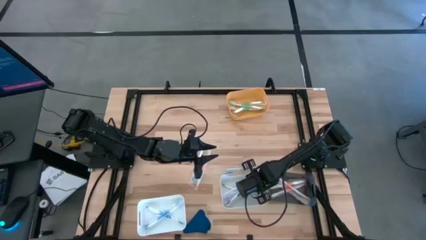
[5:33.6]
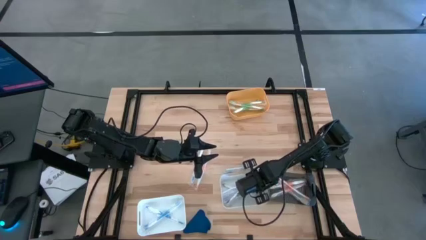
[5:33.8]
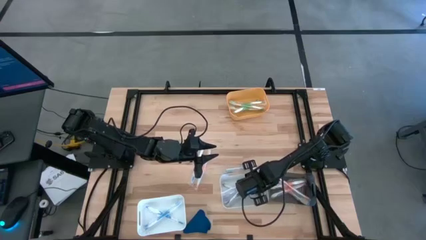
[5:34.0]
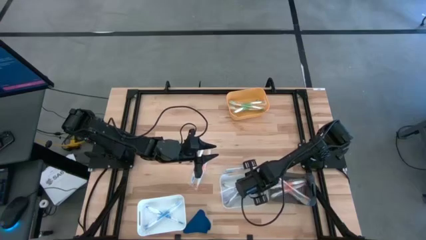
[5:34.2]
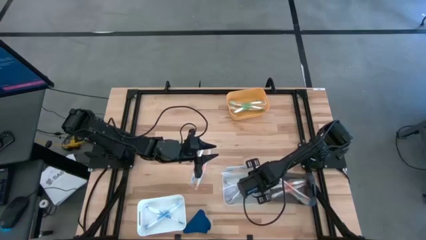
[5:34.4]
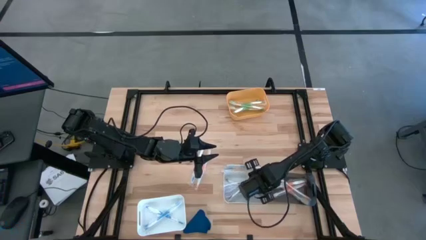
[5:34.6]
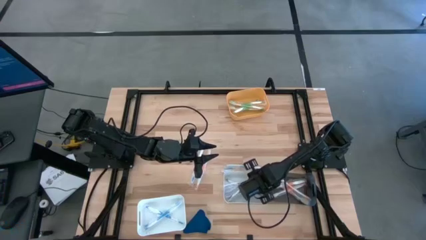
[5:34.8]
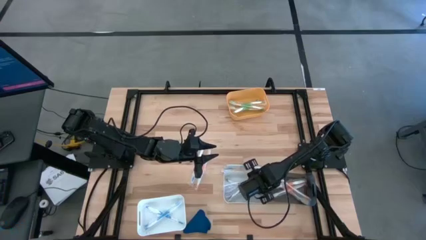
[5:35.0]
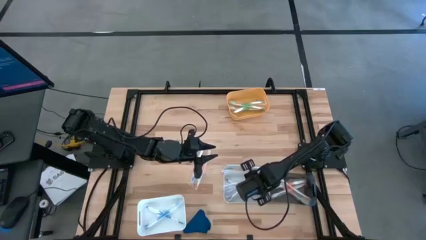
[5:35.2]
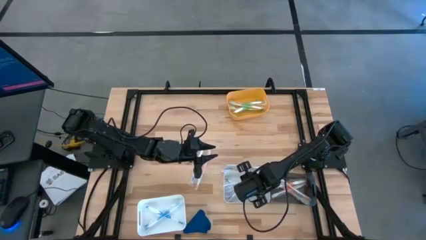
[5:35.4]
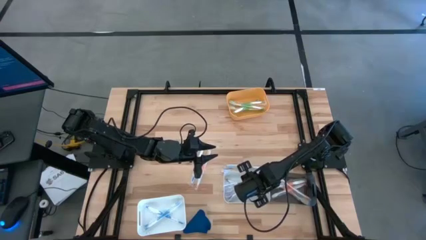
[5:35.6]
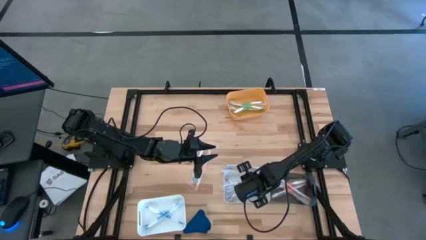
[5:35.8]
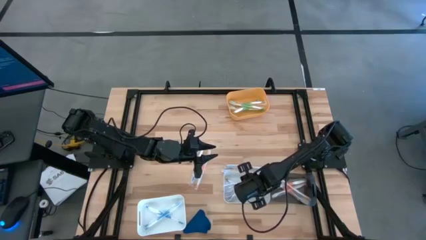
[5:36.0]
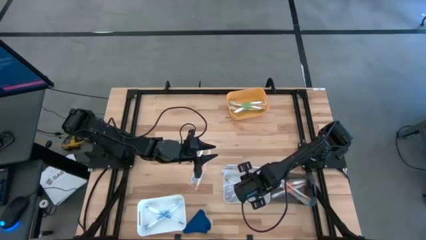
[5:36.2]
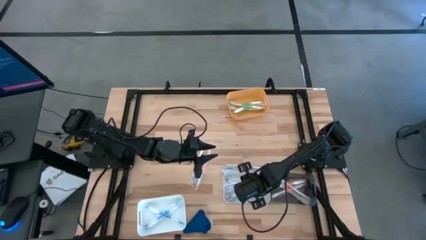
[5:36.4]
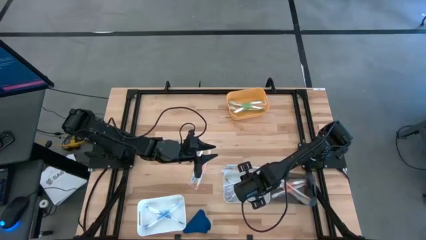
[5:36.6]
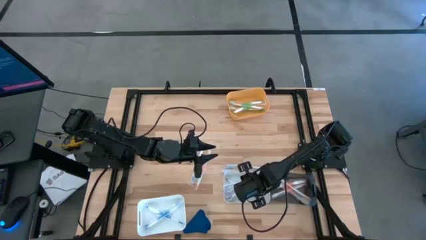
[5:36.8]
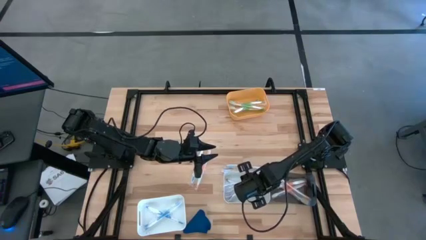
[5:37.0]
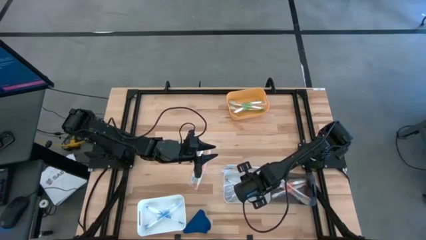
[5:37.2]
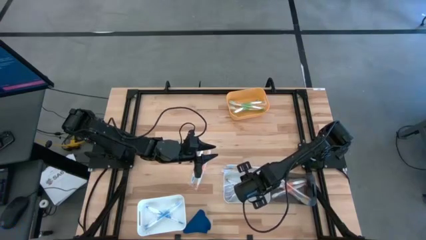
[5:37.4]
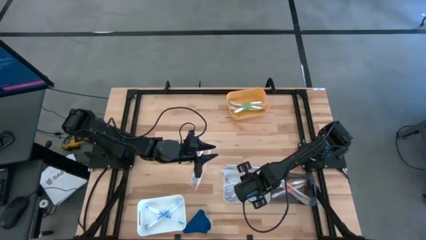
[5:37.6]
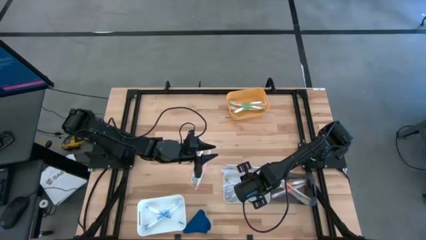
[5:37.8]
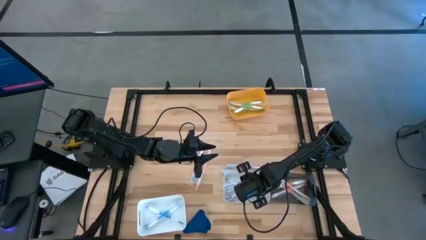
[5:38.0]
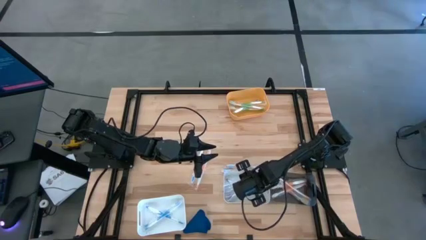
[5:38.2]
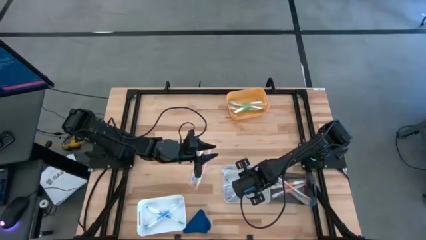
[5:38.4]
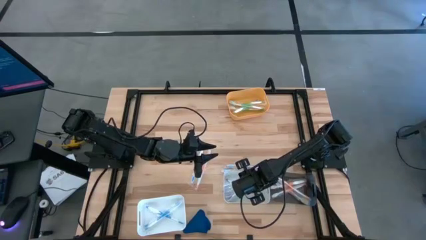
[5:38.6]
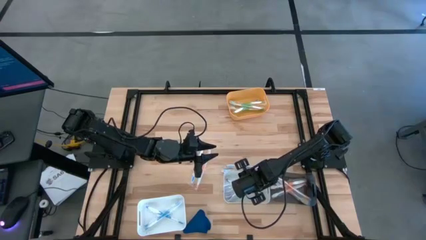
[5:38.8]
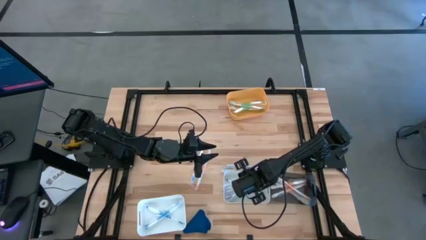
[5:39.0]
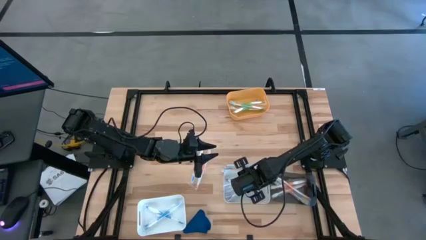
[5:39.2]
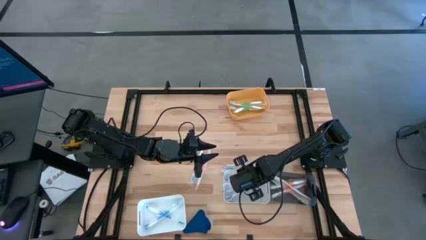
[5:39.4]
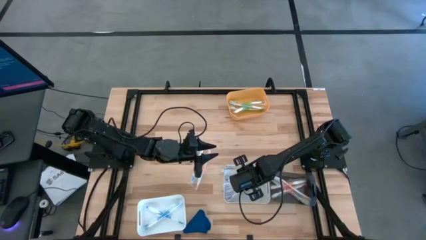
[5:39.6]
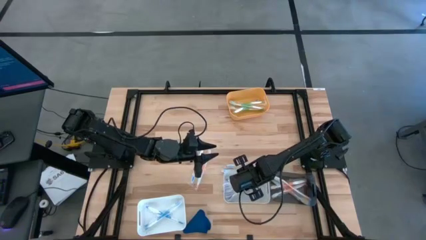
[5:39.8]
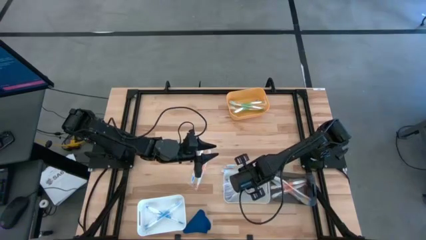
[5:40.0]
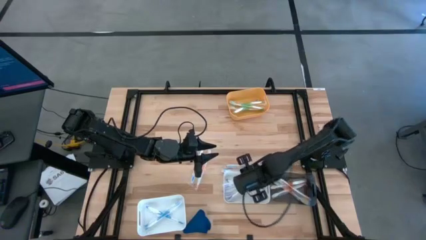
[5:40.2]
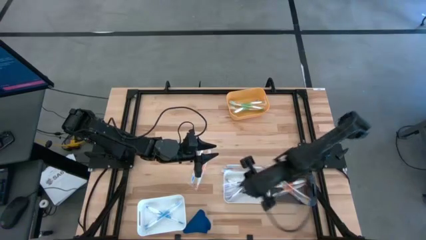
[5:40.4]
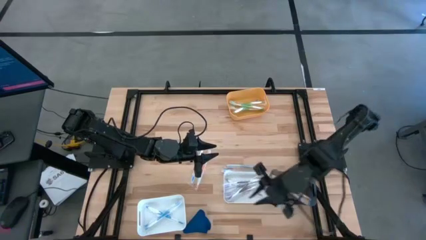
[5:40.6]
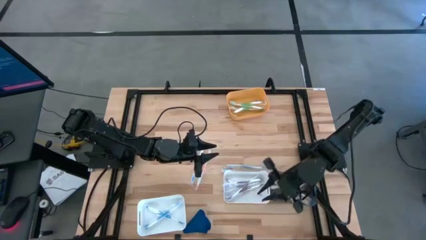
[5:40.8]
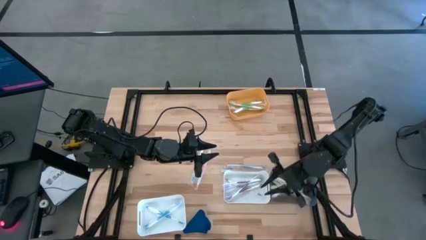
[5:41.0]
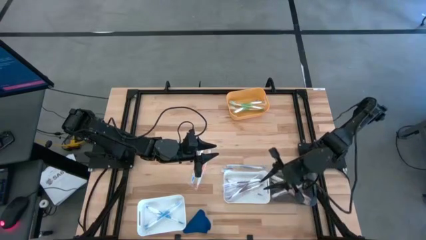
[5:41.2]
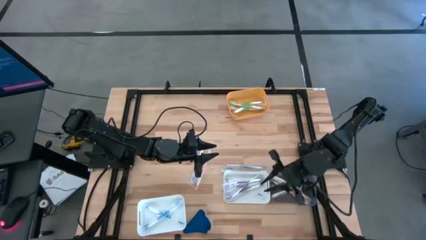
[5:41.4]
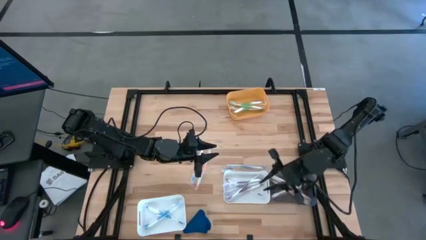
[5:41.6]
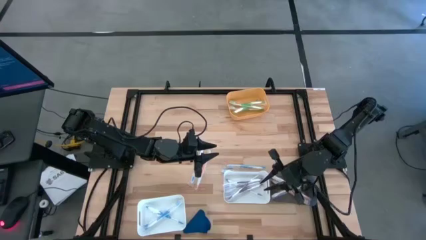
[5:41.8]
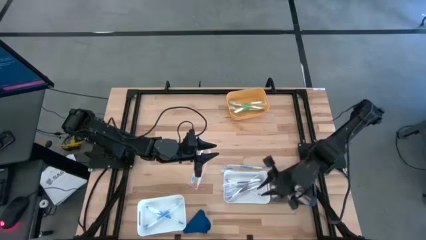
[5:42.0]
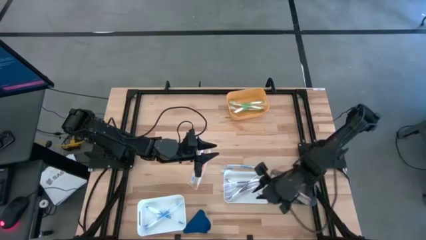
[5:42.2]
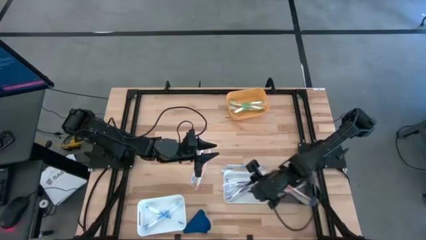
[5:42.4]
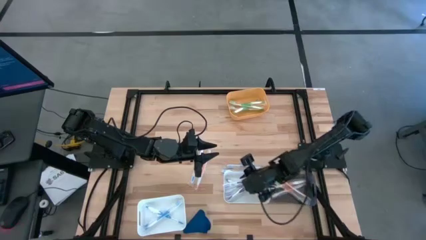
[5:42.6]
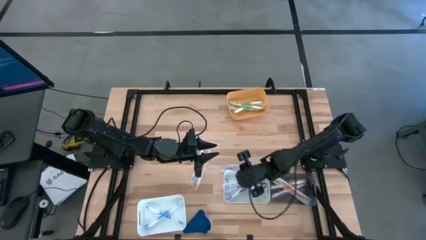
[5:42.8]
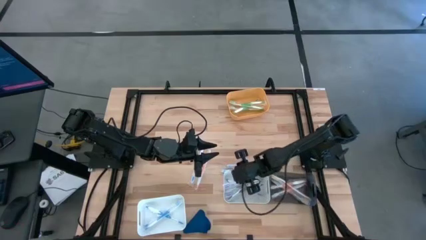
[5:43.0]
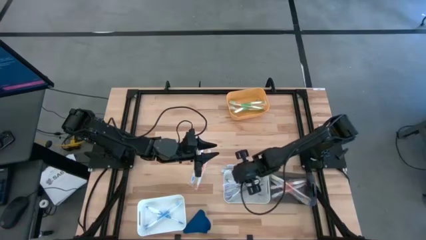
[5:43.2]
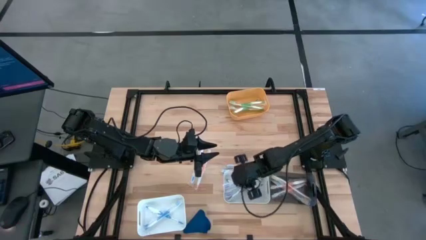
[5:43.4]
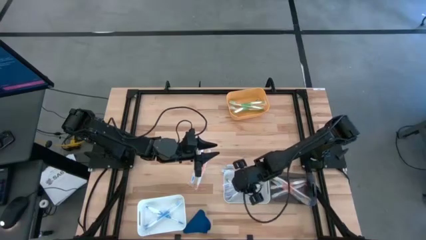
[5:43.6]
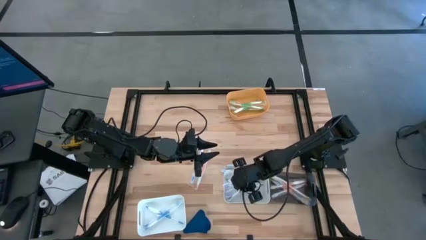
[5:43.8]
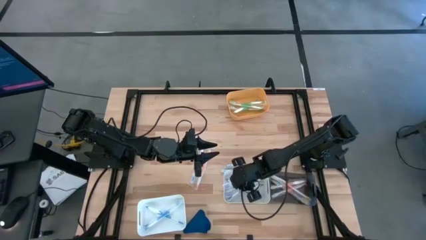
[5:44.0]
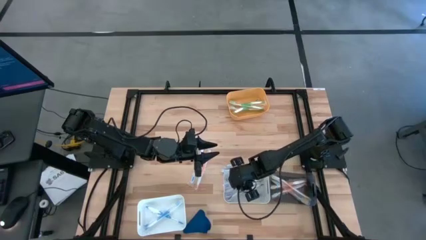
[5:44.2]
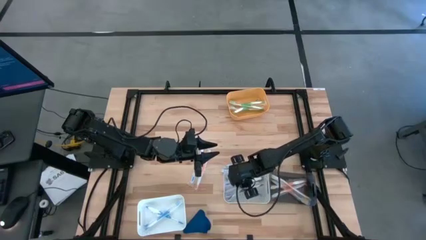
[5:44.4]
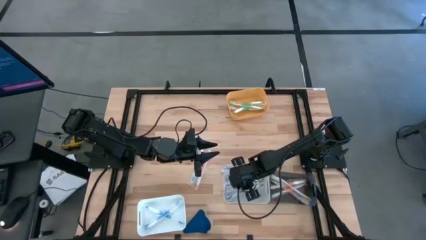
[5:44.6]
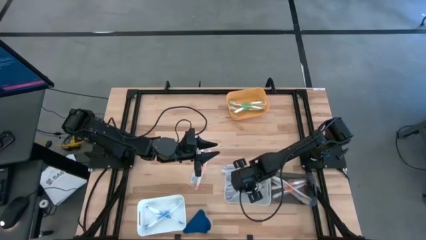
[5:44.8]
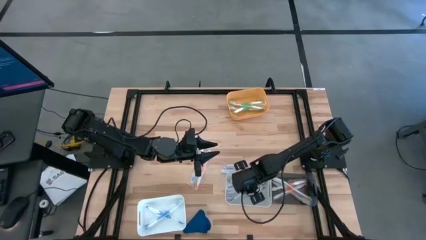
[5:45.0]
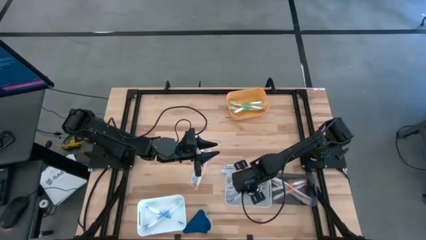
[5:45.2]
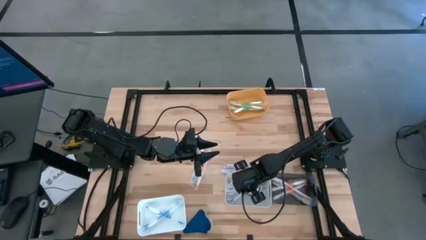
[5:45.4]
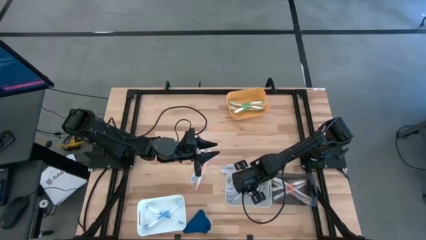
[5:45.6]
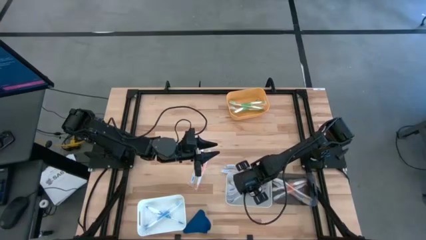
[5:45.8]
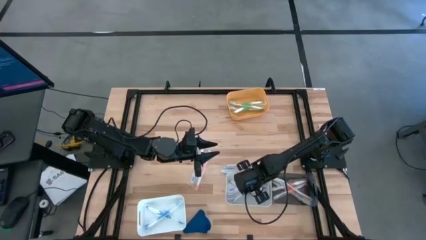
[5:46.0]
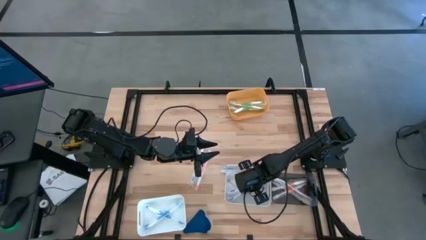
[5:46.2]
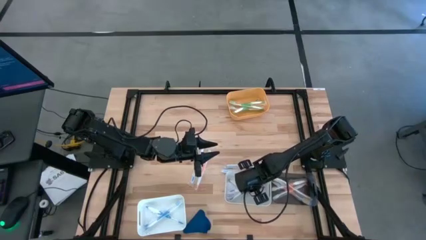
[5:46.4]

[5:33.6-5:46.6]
Task: Pick & Place Toothbrushes
Put the violet toothbrush into the right white bin

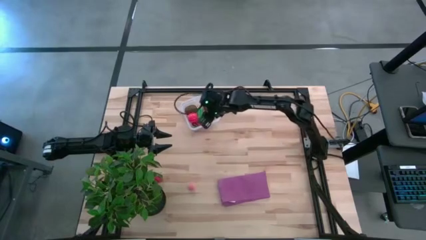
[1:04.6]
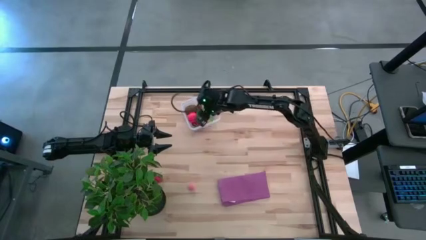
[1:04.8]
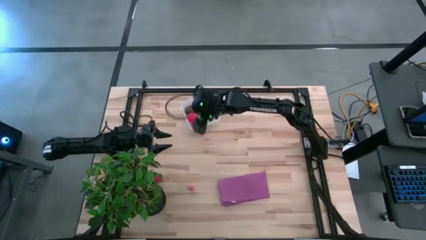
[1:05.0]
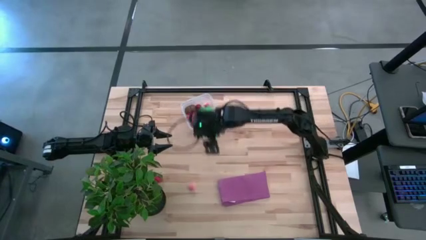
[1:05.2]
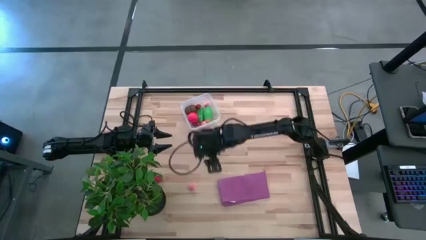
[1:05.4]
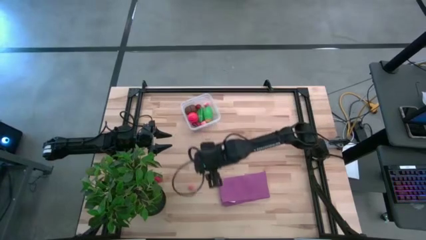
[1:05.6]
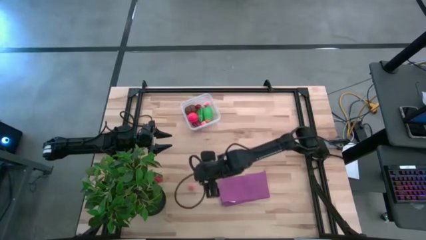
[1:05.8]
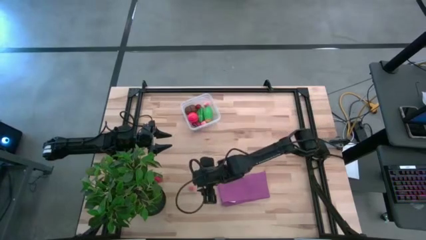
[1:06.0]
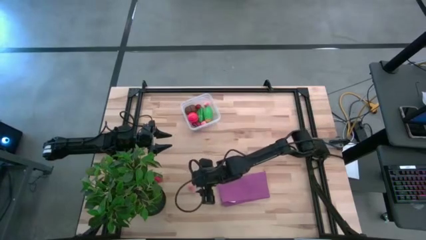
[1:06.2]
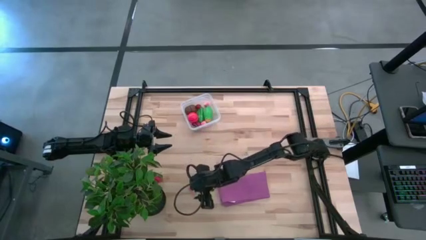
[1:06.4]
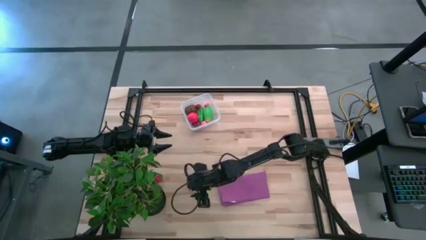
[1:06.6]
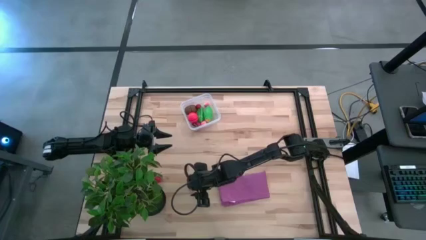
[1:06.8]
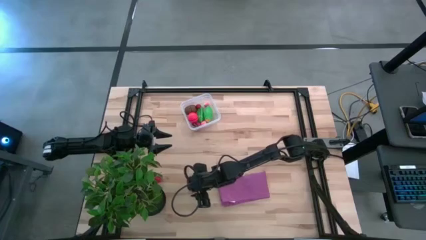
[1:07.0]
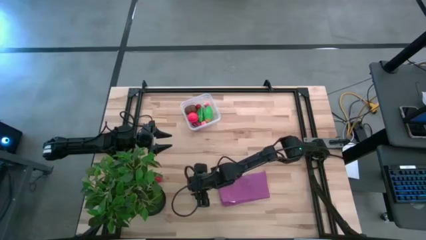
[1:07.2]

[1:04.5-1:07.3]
Task: Pick and placing Produce into tupperware
Put the pink peach into the transparent bin
